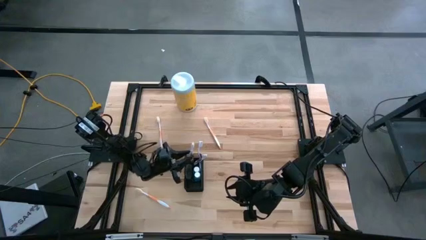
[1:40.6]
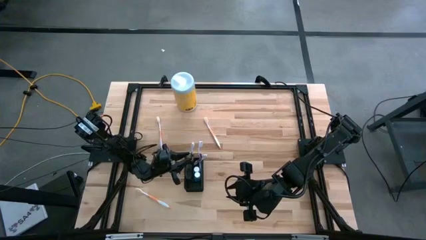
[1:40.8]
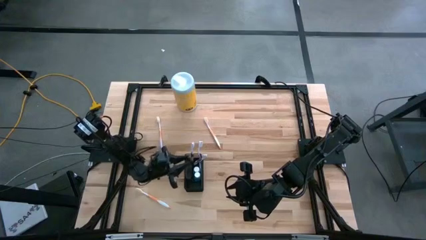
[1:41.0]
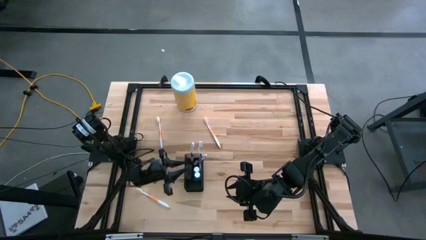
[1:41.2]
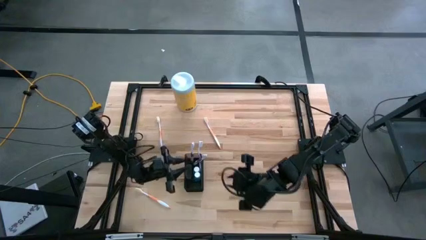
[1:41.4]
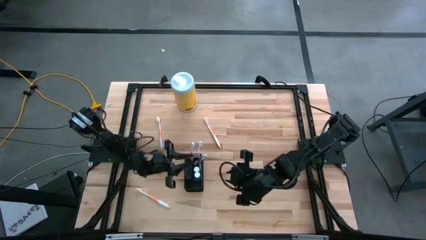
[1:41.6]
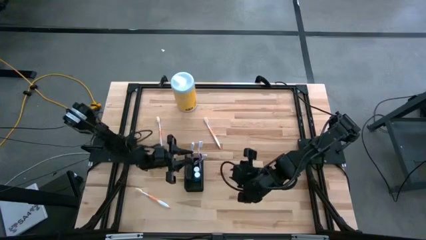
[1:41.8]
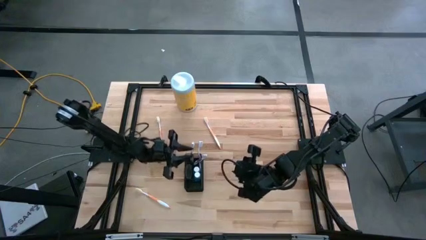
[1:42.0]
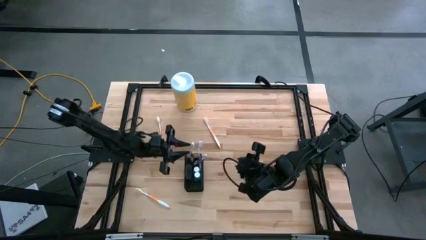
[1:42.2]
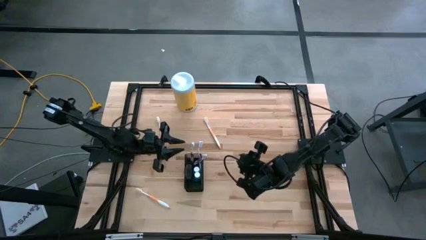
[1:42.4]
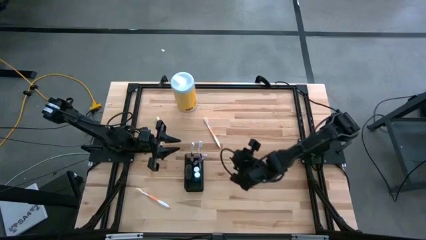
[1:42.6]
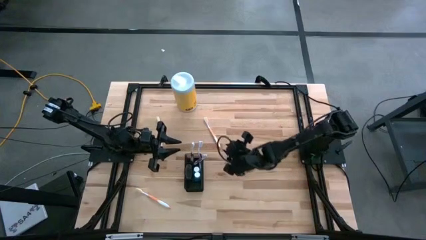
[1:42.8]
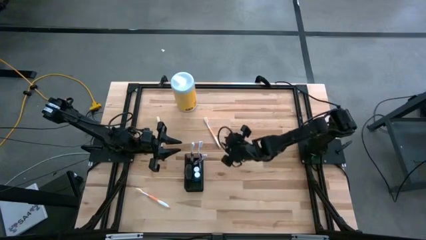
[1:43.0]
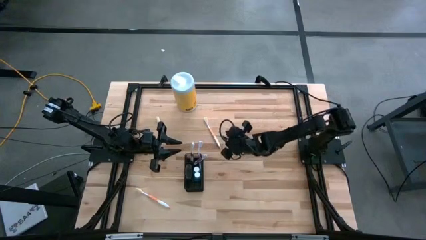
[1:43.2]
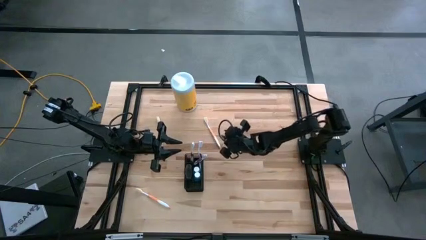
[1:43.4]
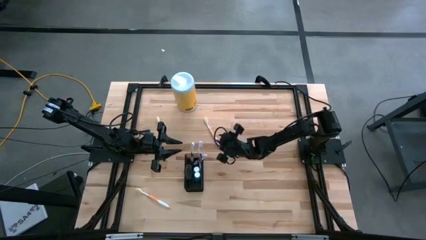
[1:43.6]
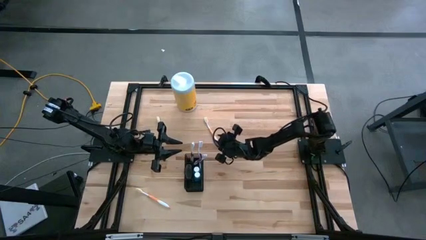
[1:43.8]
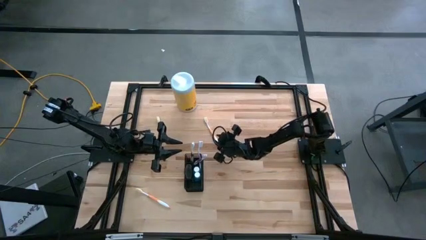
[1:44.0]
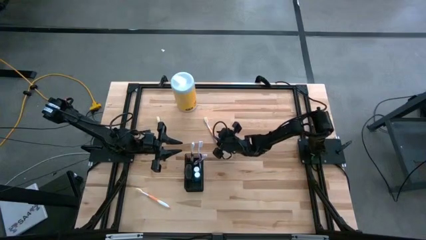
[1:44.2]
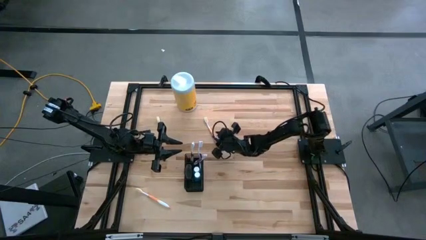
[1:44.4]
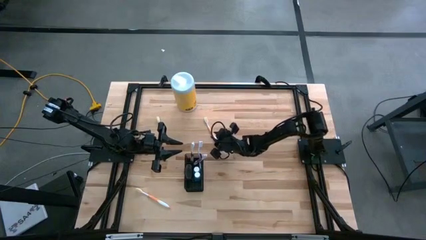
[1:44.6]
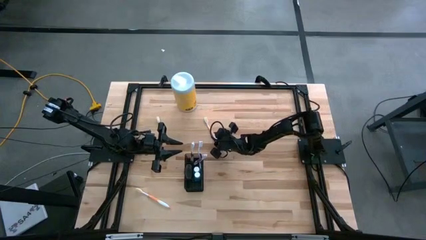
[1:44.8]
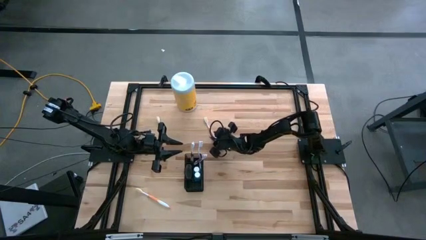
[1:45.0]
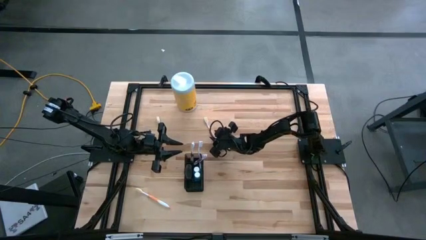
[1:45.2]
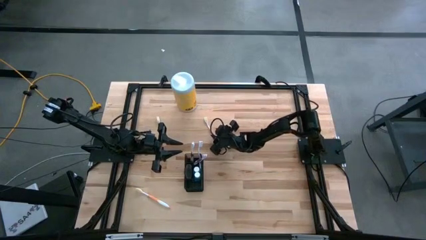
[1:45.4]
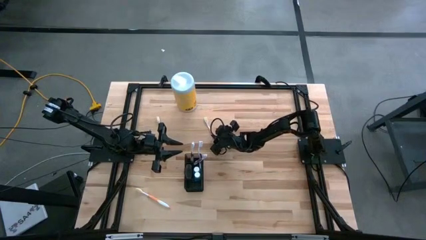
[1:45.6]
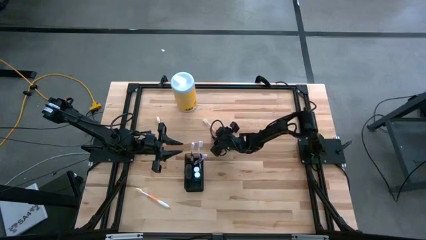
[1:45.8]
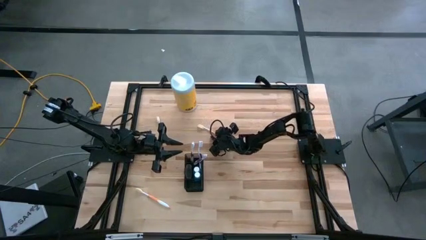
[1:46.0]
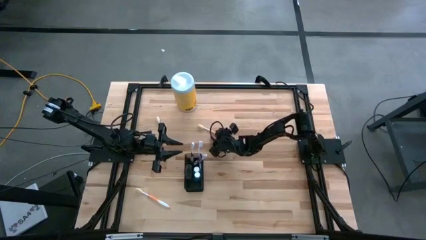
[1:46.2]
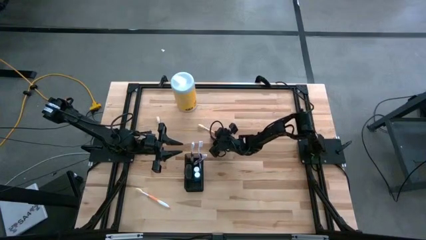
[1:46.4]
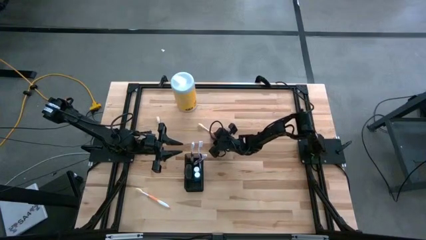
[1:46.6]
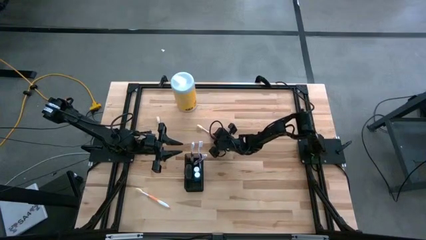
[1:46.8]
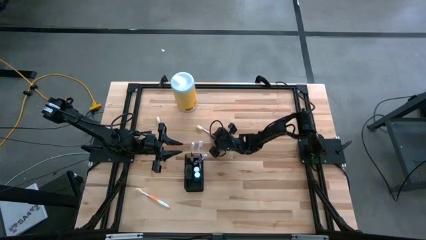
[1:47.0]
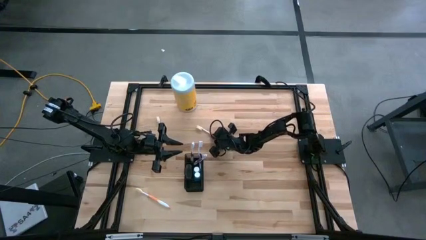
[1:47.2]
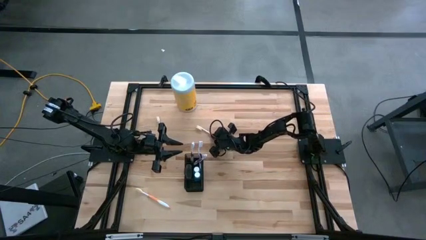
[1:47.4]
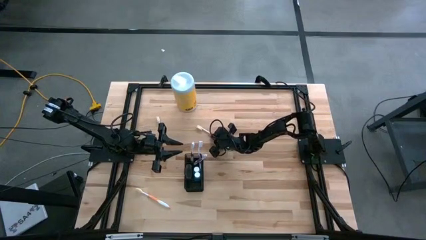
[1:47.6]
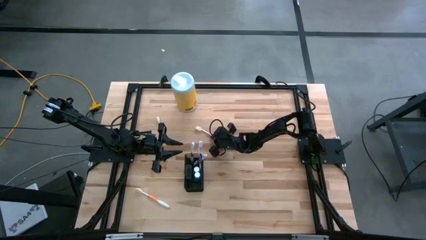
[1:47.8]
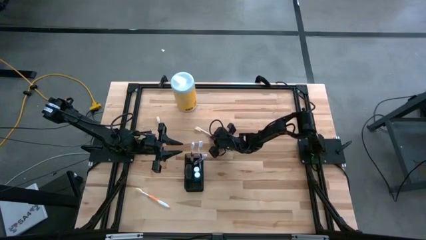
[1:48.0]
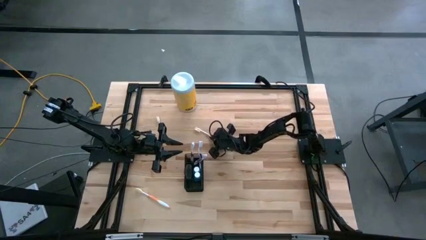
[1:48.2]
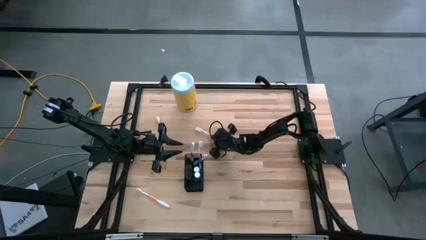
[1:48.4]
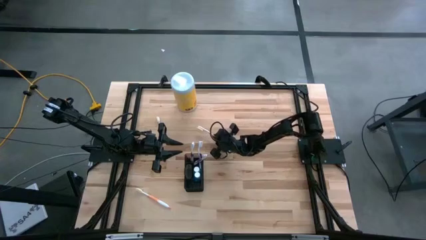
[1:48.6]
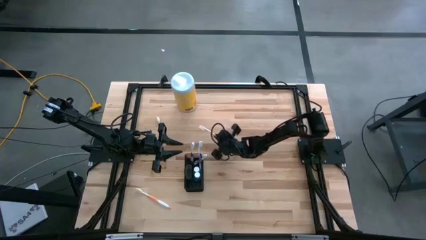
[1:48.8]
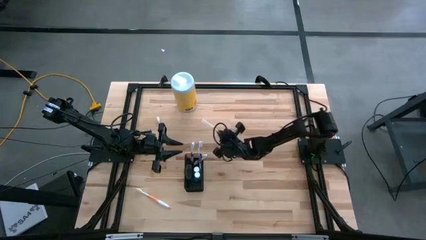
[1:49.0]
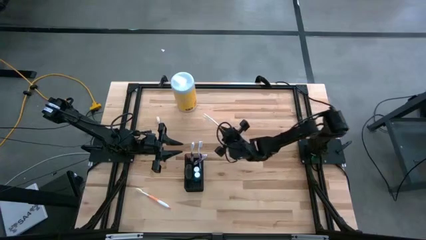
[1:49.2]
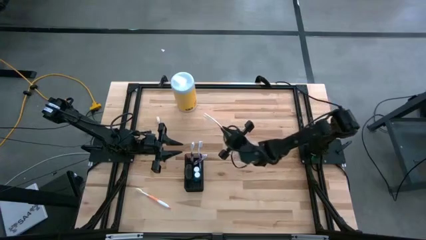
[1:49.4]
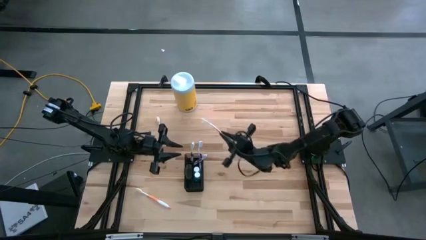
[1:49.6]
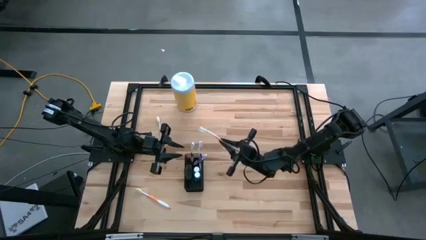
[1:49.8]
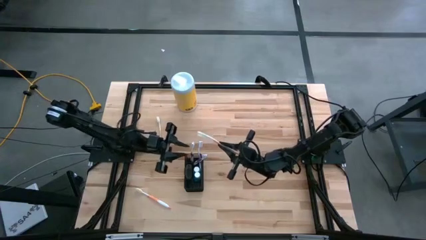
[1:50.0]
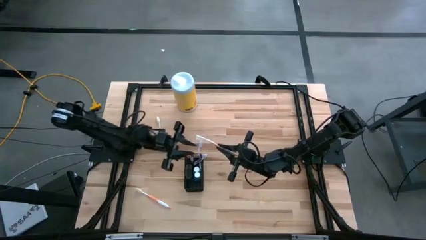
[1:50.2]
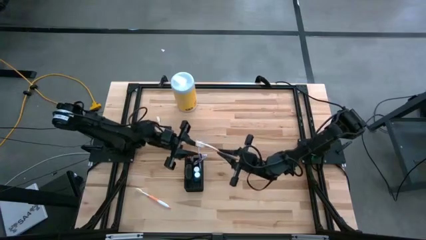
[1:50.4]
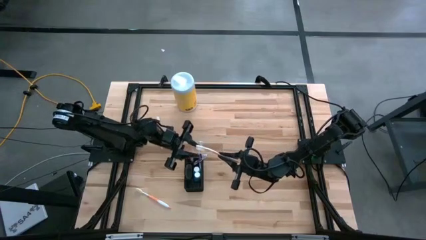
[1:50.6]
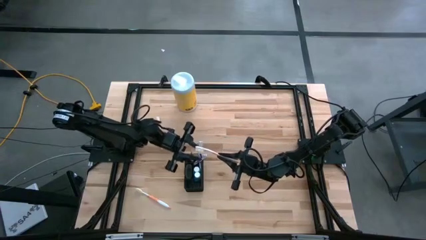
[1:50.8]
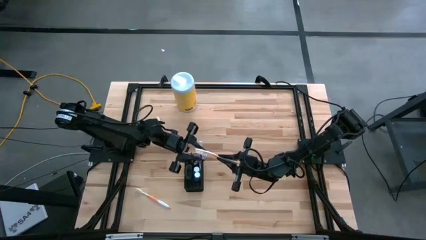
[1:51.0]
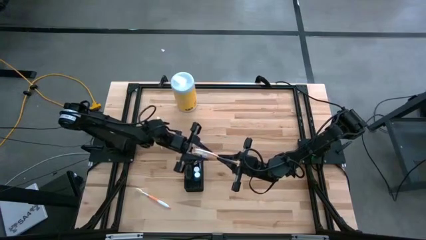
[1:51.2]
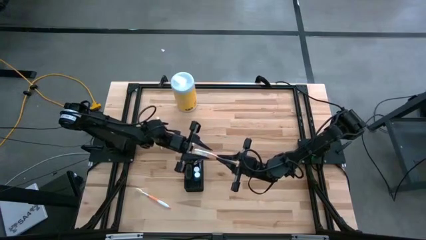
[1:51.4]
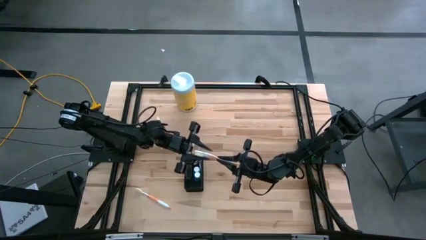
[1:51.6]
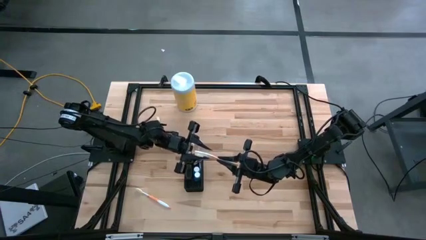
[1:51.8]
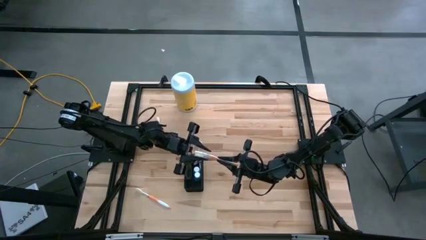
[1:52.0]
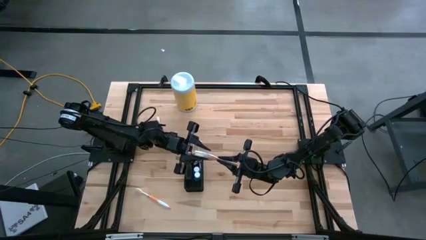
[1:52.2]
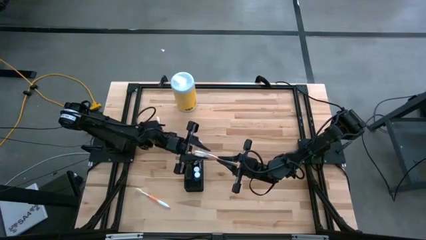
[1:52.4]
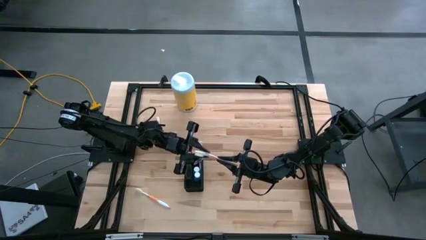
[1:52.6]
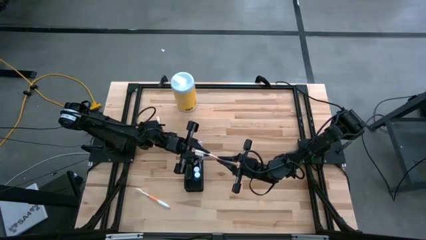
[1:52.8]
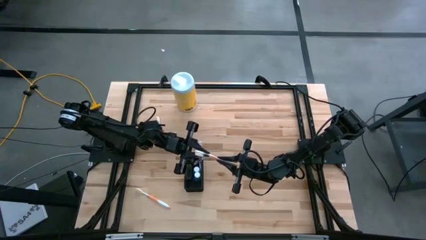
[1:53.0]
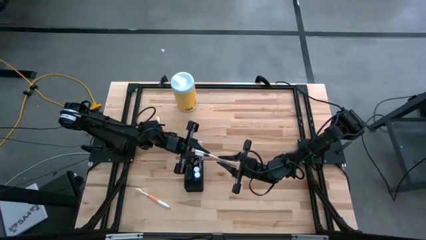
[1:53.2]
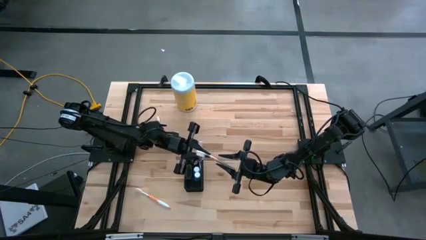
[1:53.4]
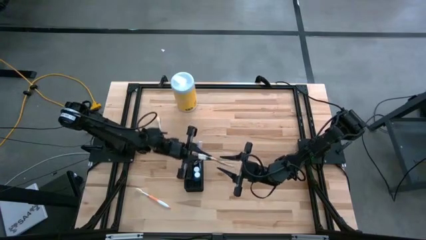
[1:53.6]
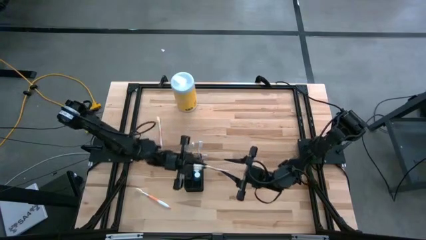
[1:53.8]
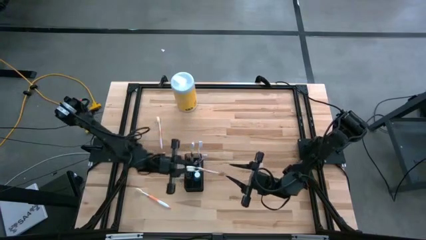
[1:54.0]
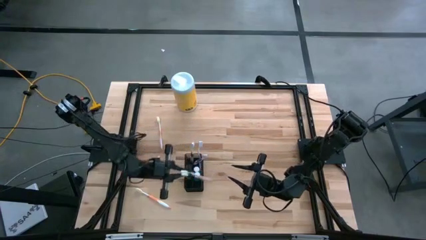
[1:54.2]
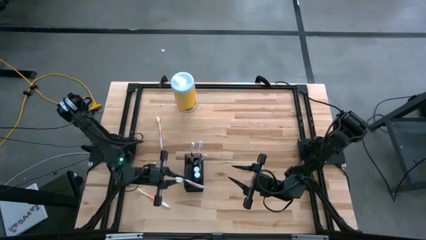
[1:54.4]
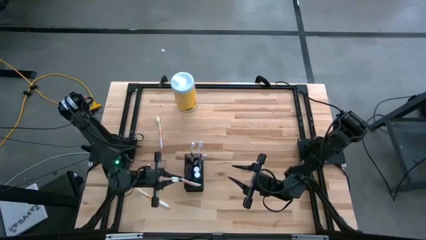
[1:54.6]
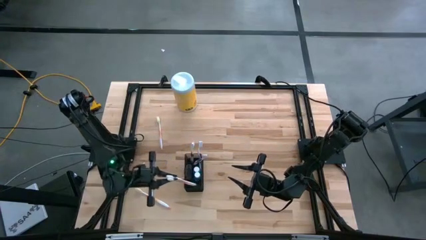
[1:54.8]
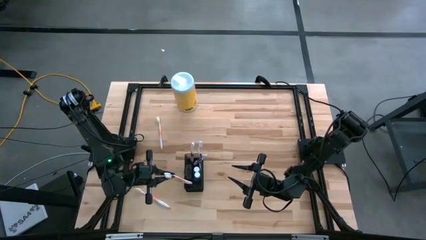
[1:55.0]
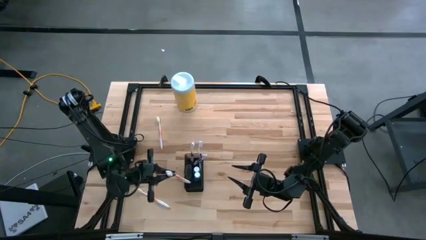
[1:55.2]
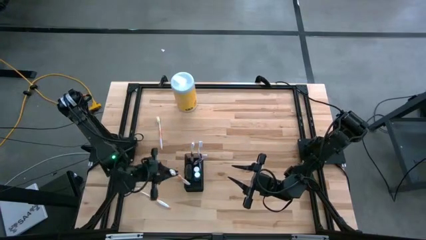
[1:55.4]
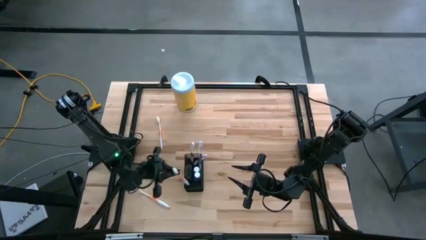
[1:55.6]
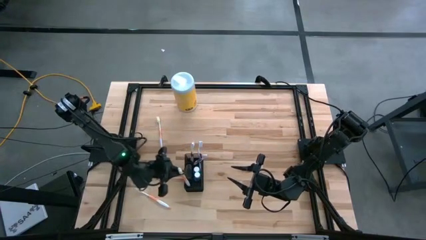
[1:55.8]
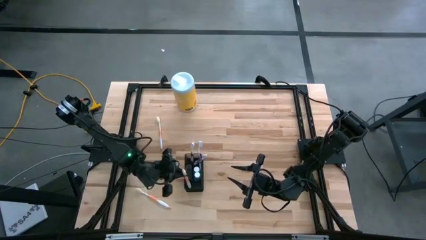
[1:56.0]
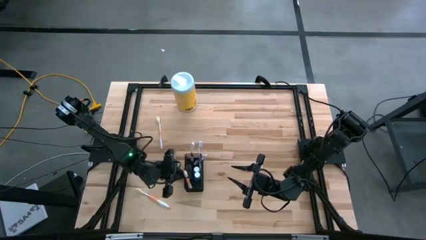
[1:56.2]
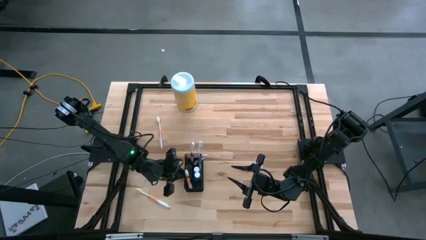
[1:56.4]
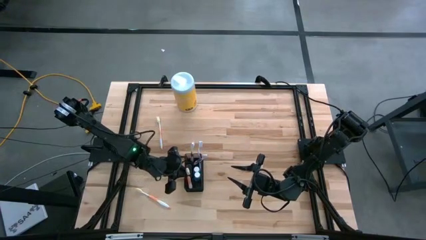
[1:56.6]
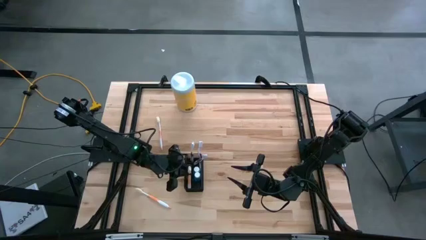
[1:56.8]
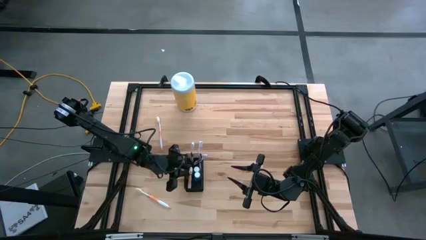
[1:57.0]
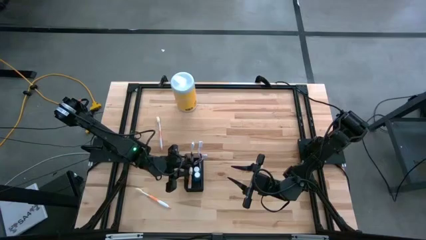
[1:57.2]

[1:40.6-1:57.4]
Task: Pick & Place toothbrushing station
Put the top right orange toothbrush into the bottom section of the black wire organizer
